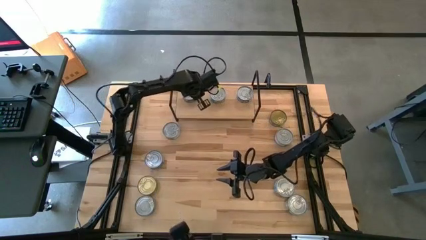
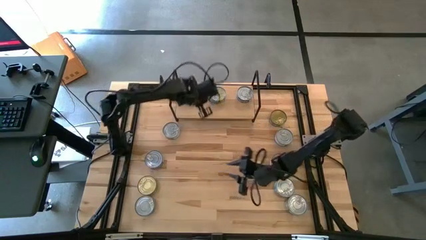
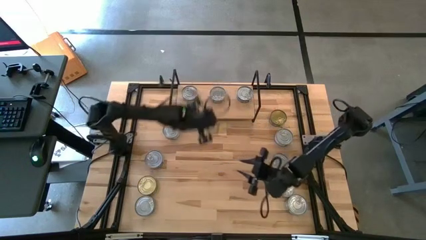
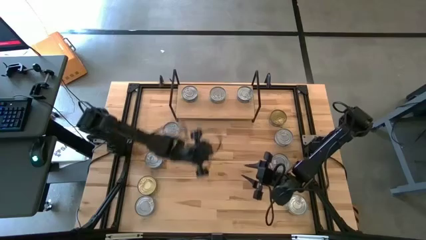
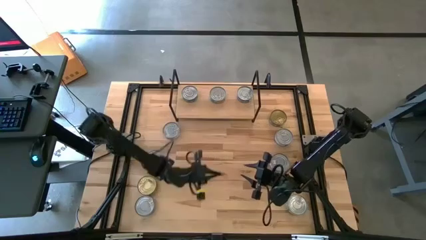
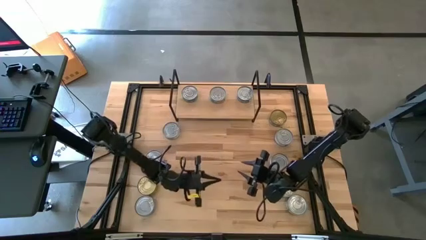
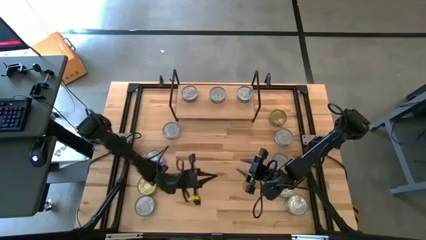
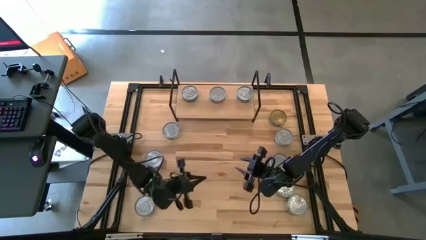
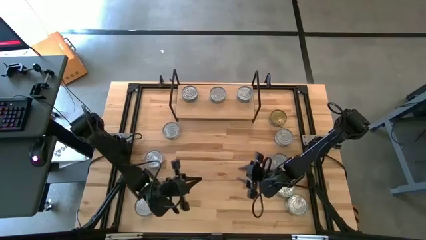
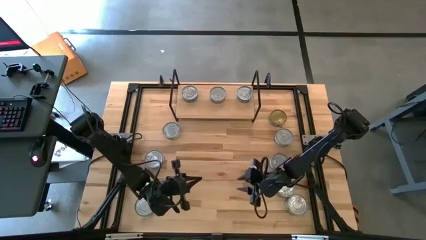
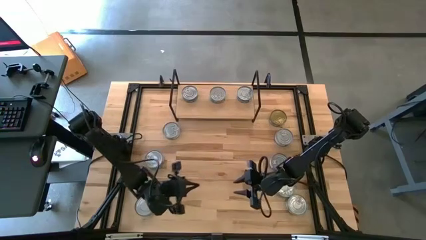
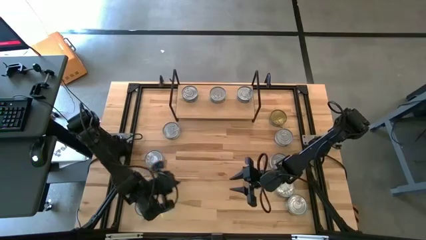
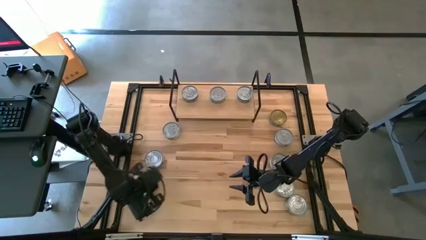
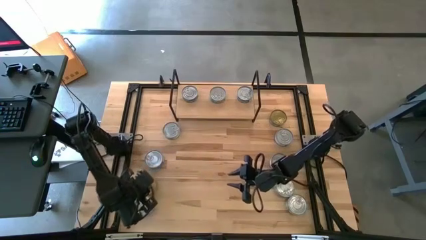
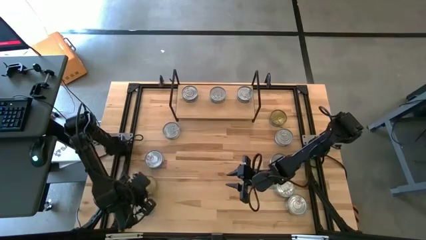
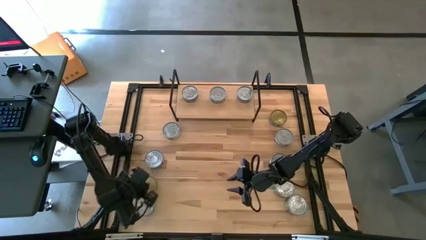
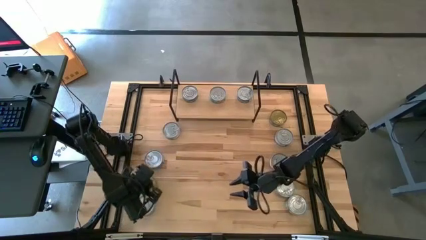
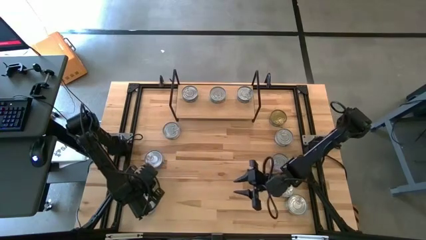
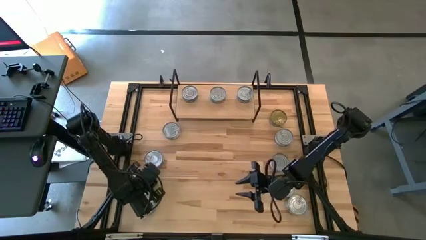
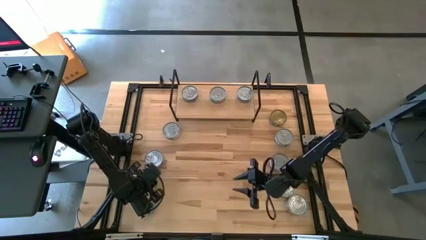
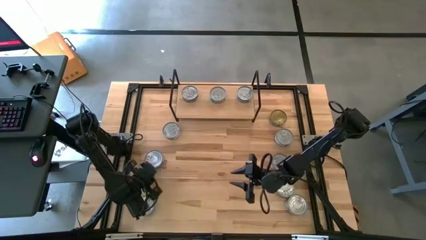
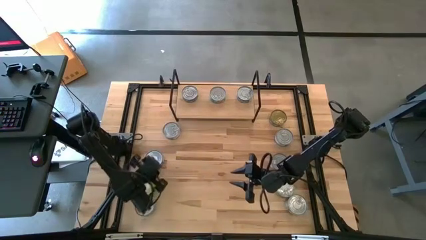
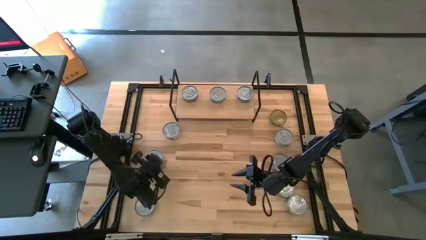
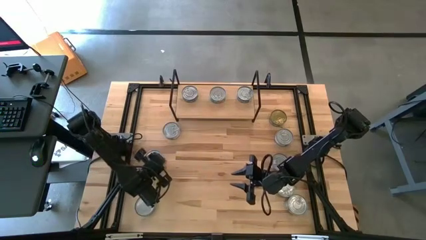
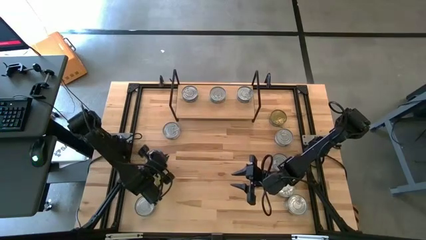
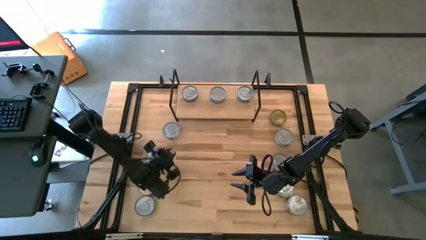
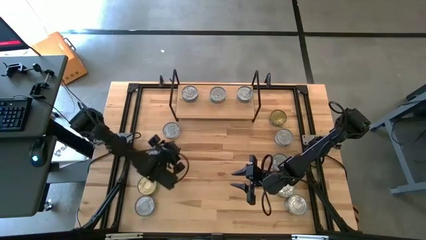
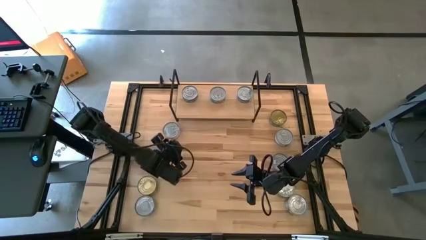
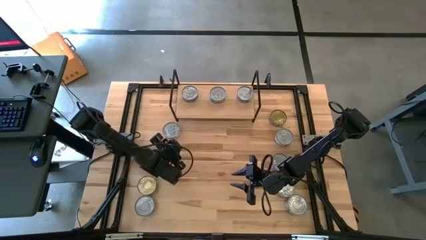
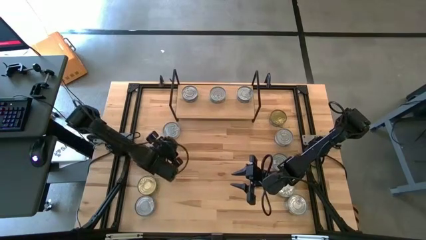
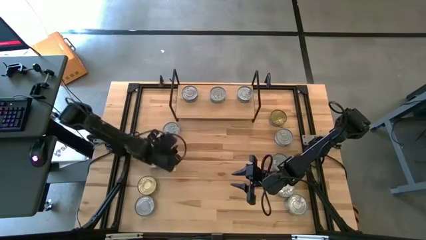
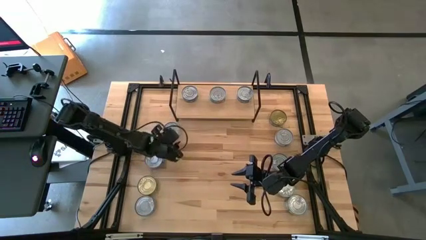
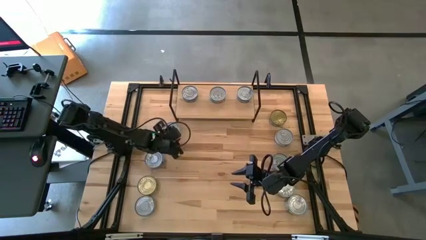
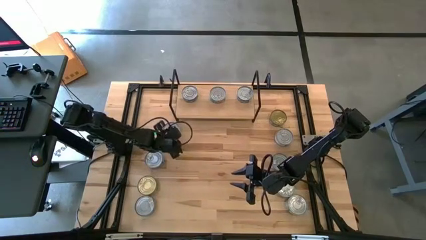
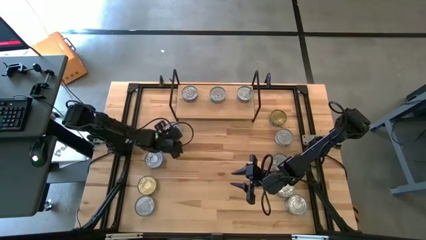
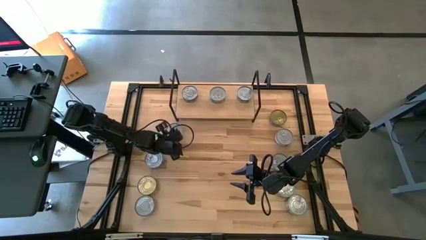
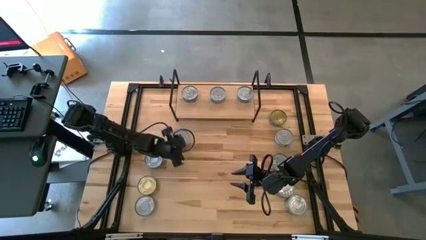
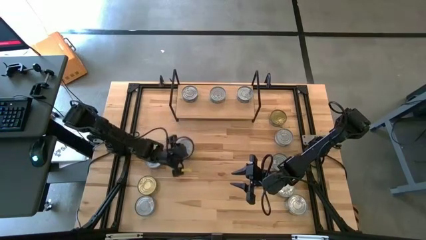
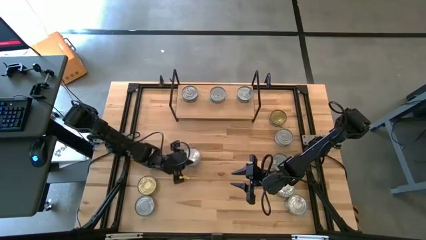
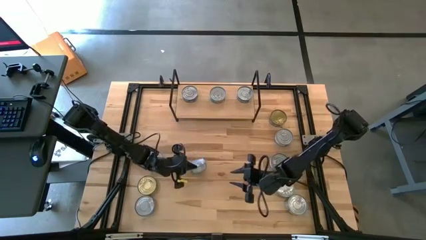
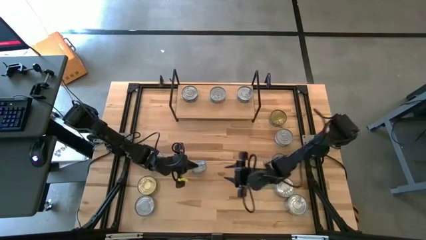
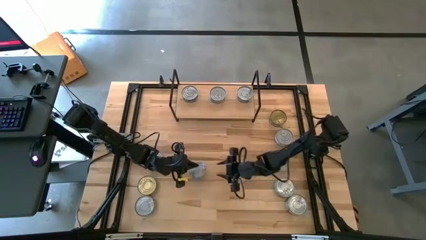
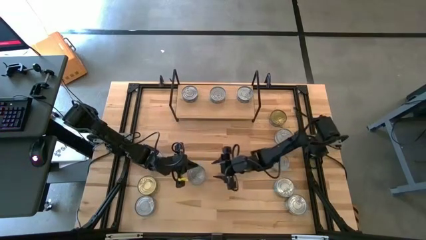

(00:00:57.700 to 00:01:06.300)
Task: Stack canned seafood by type on shelf
Put the light blue tuna can on the shelf aligned with the other light blue tuna can

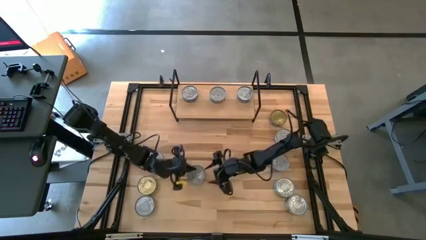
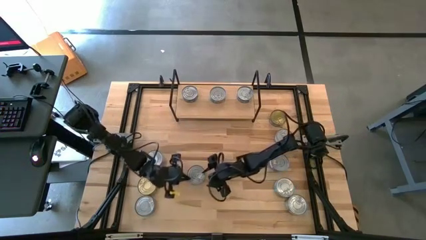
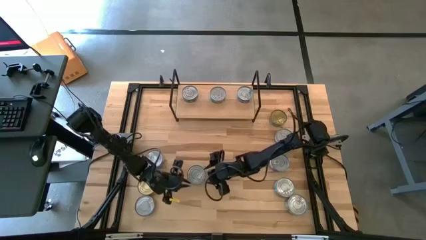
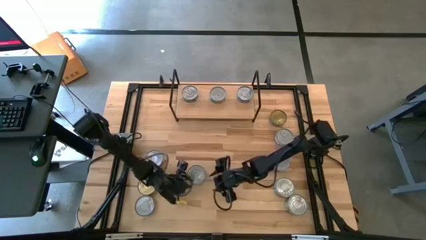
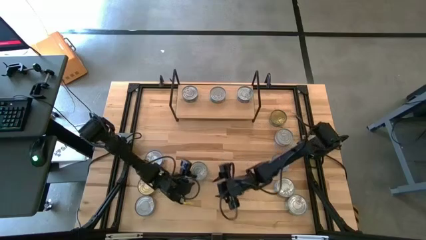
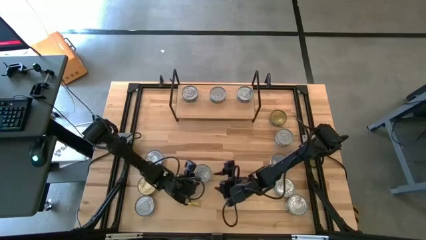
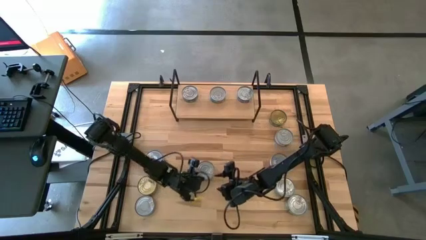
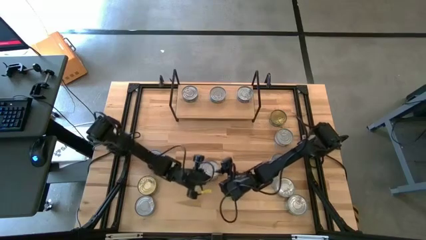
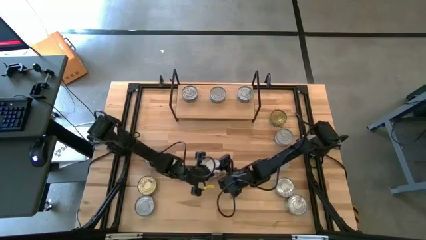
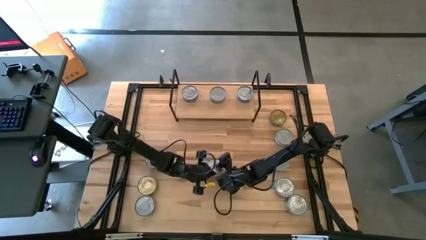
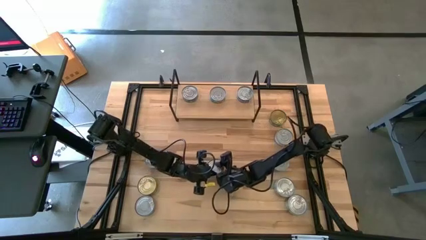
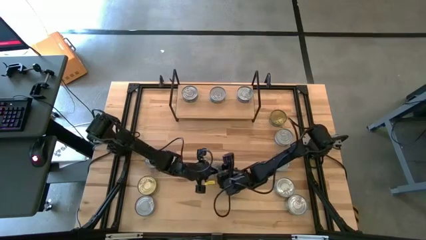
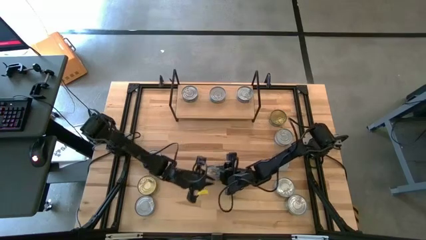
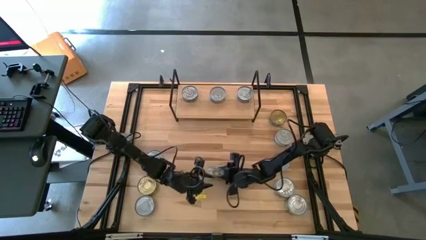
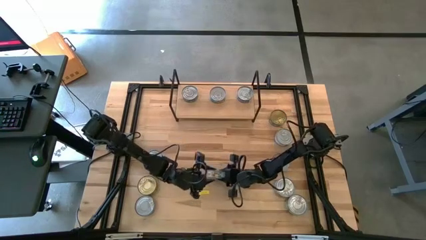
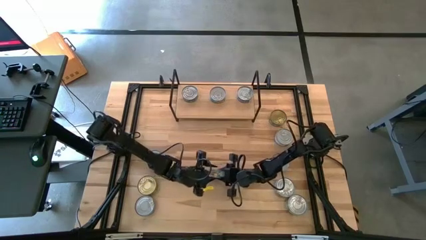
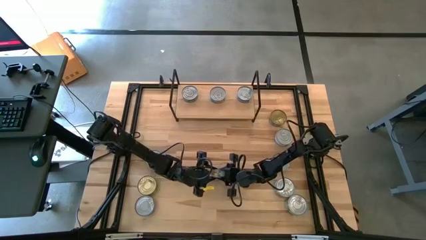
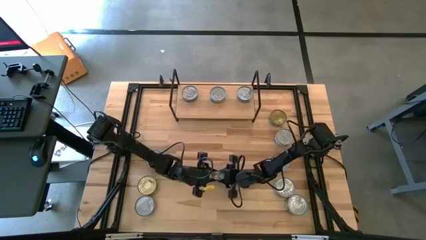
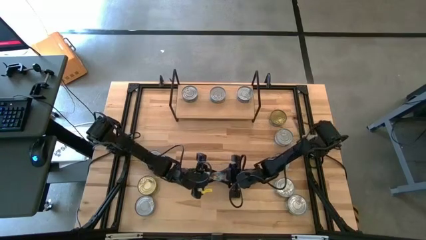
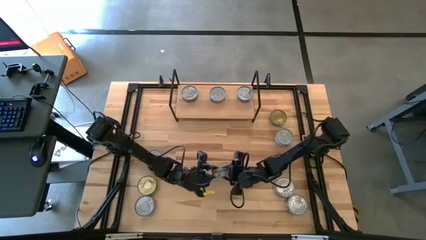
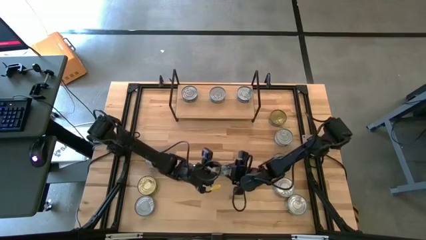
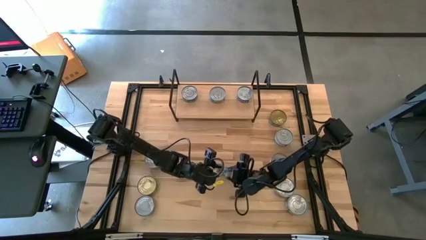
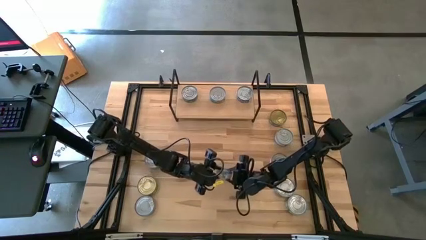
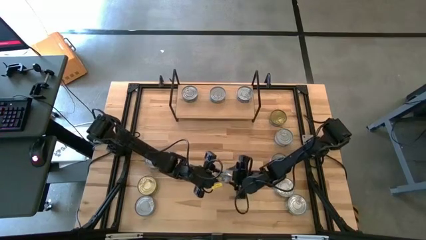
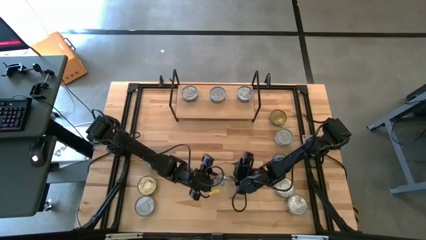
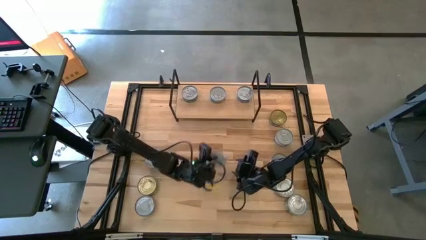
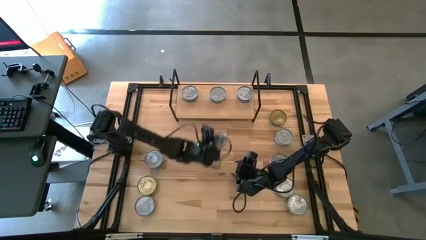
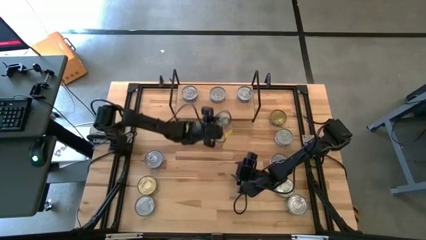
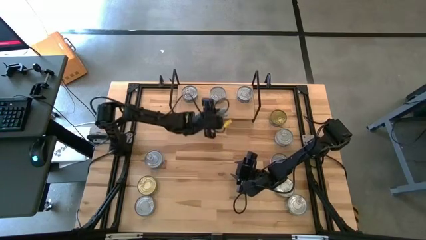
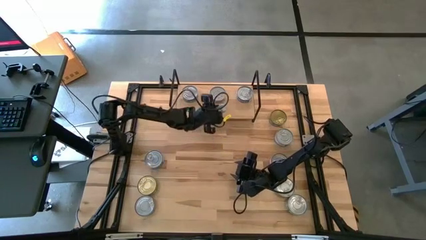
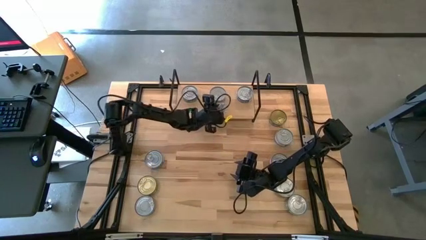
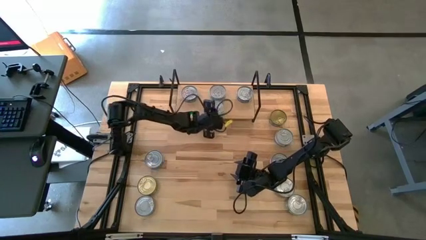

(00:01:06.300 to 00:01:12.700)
Put the light blue tuna can on the shelf aligned with the other light blue tuna can
